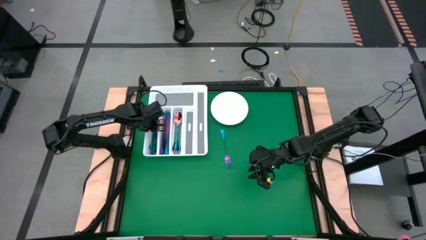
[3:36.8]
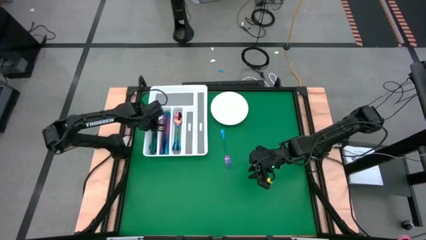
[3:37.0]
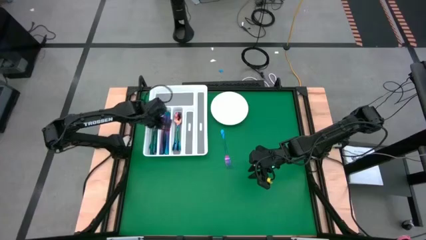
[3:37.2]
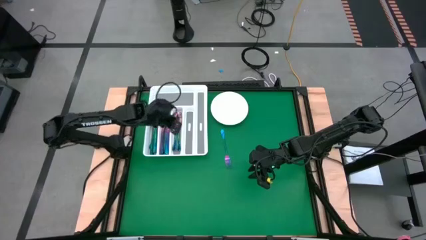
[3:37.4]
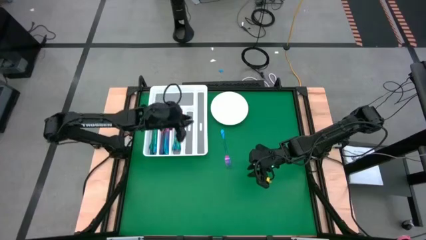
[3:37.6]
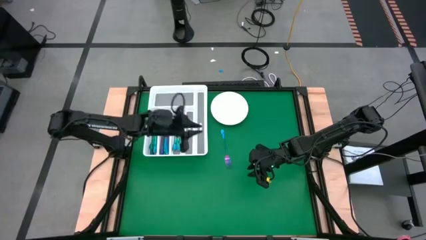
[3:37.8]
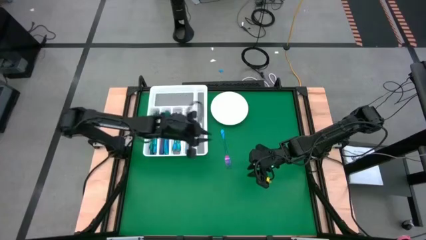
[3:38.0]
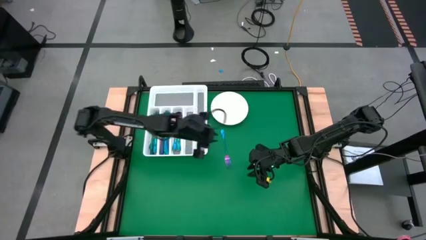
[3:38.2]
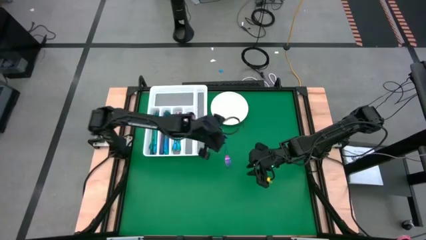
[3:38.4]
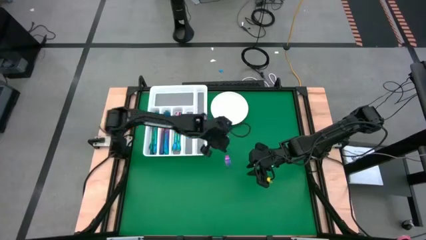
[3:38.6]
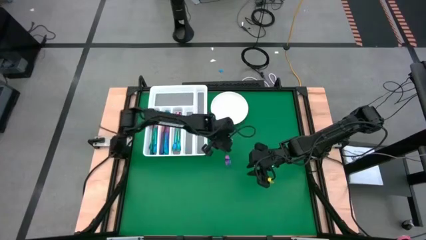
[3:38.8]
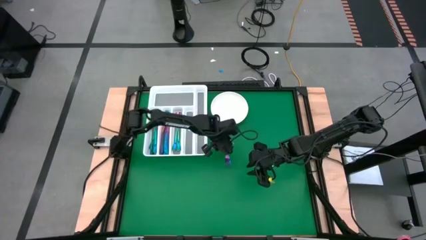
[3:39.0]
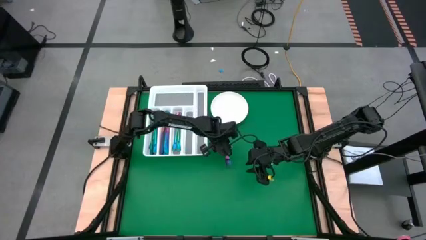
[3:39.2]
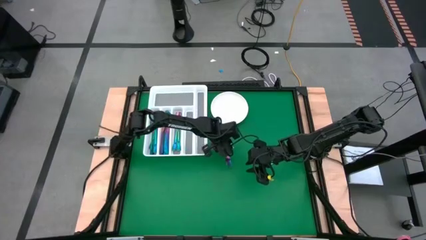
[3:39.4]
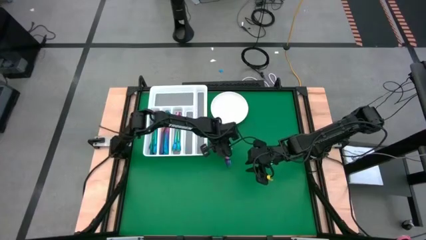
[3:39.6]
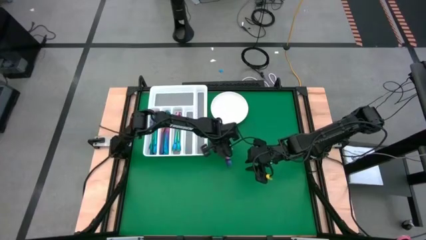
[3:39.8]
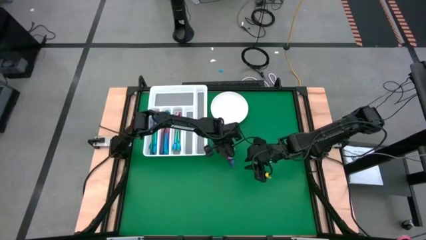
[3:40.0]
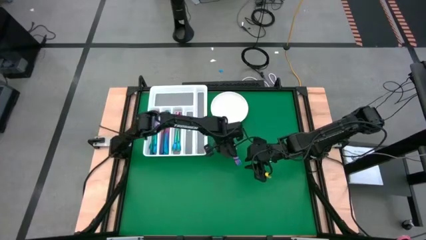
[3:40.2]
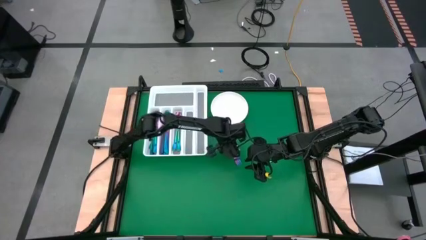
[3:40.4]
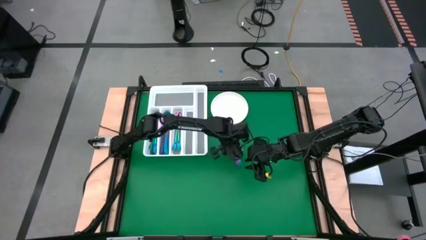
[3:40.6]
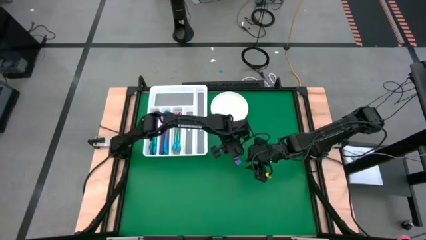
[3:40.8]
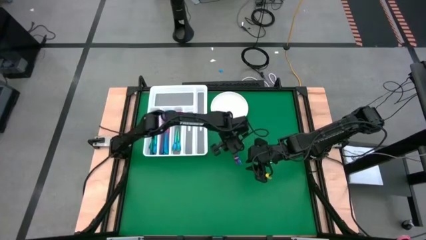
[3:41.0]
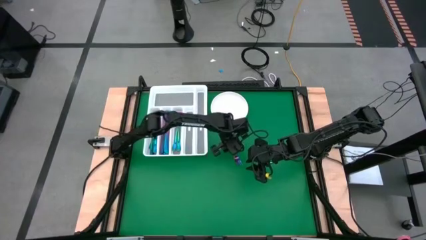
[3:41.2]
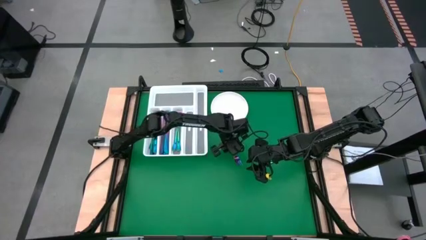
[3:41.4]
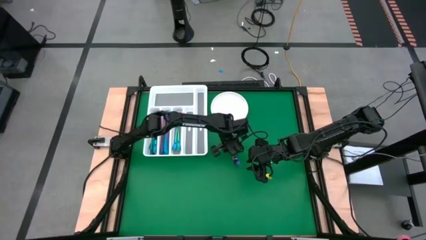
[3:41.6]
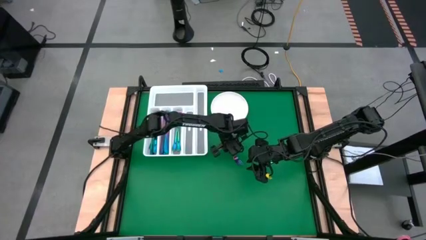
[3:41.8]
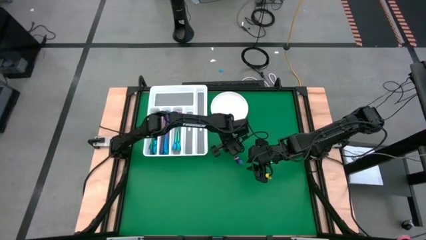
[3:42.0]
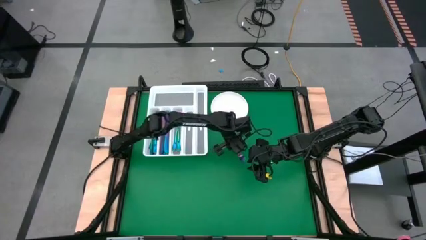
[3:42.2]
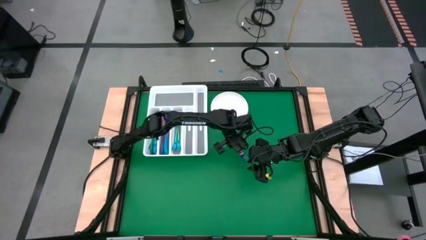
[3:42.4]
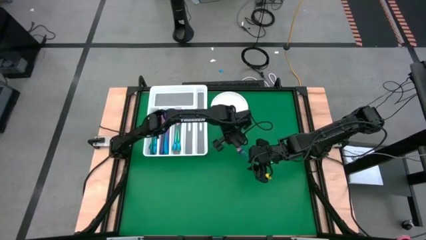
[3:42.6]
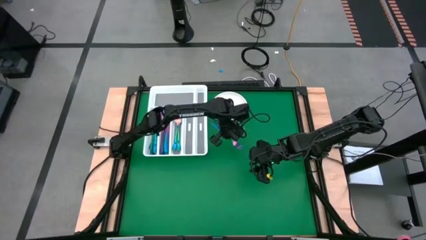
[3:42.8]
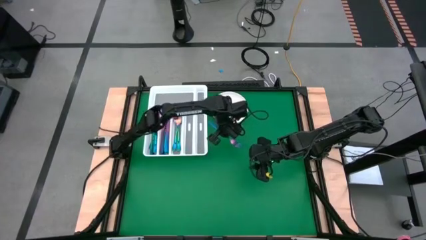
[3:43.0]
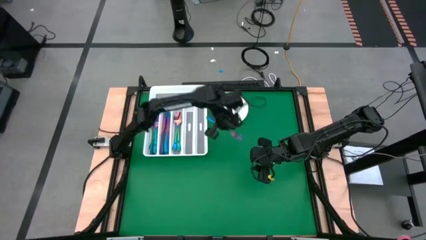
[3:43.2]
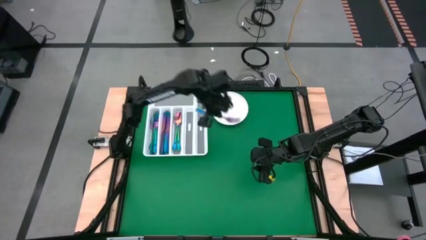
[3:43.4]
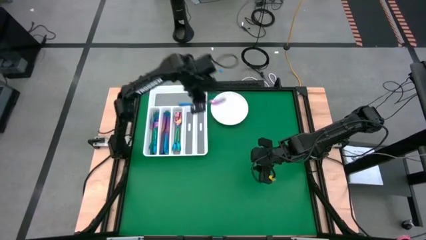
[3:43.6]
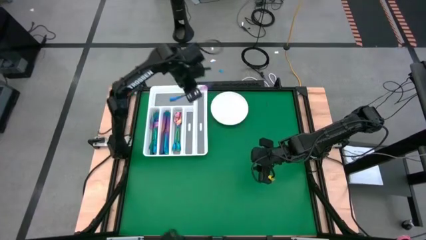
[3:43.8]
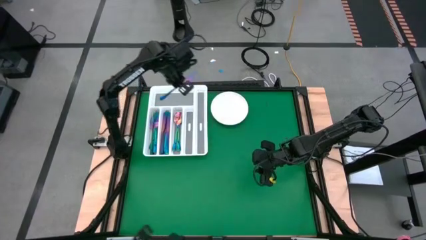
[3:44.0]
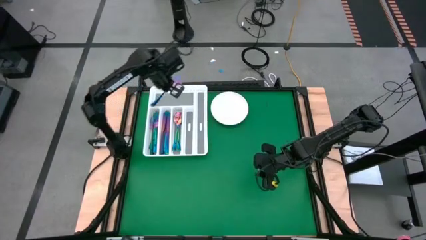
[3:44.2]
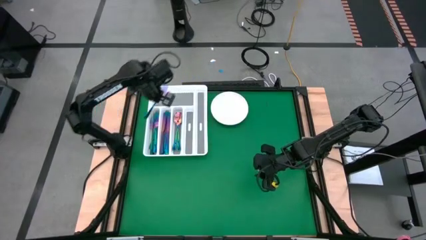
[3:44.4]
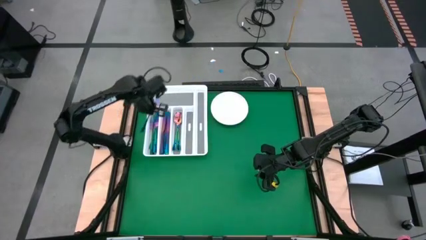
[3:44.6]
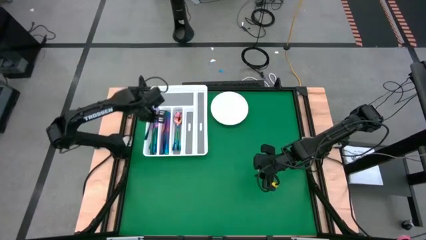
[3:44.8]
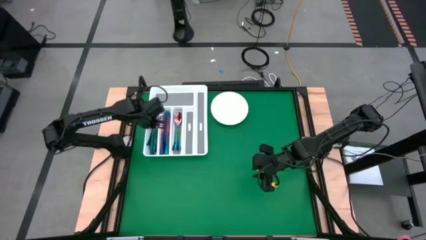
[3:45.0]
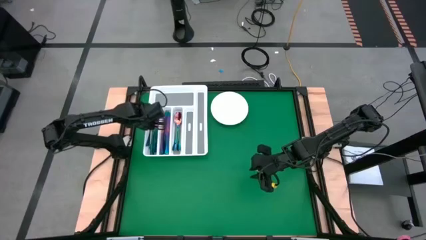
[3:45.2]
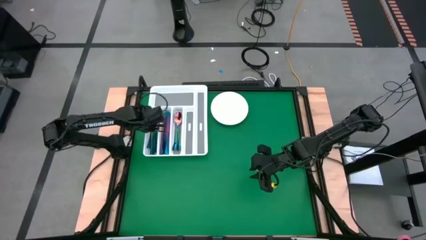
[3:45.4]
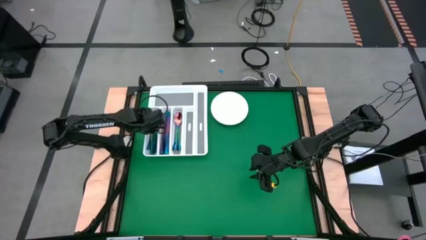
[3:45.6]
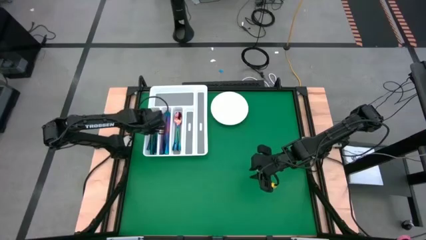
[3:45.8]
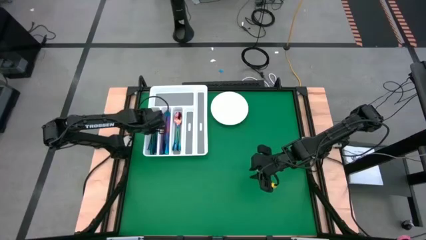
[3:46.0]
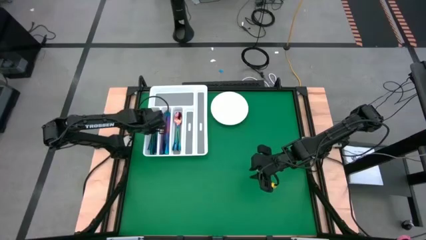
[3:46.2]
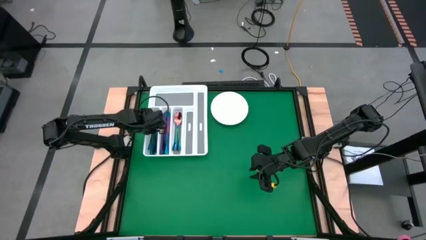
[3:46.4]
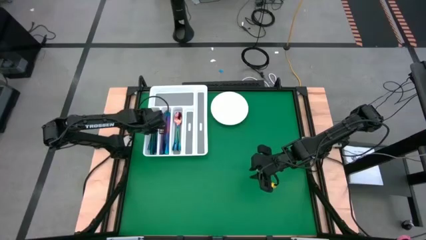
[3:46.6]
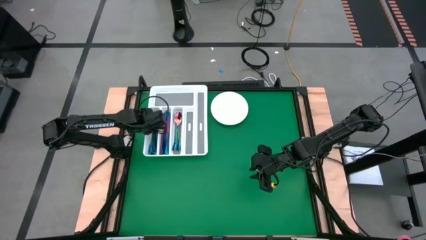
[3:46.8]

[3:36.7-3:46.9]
Task: Sort silverware
Put the blue fork into the silverware tray

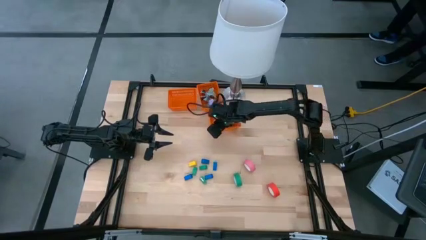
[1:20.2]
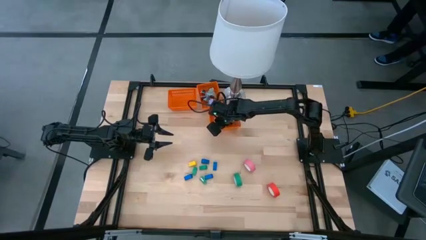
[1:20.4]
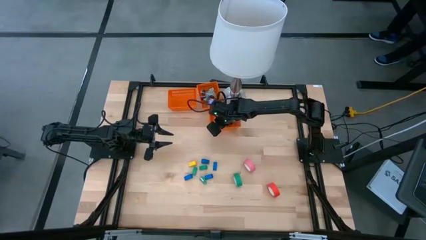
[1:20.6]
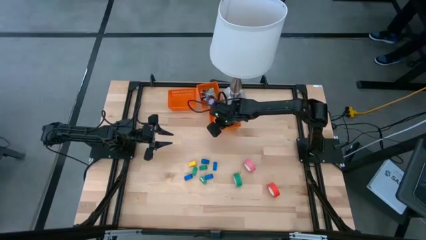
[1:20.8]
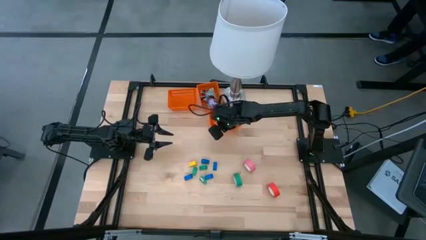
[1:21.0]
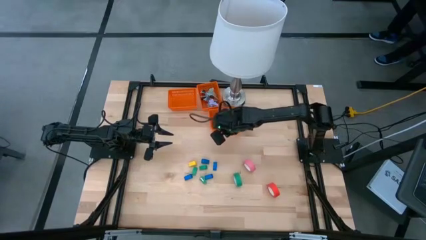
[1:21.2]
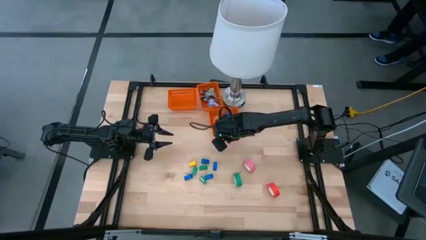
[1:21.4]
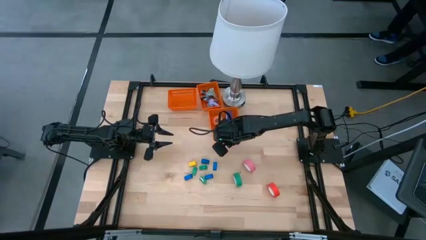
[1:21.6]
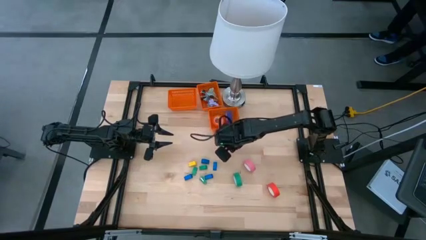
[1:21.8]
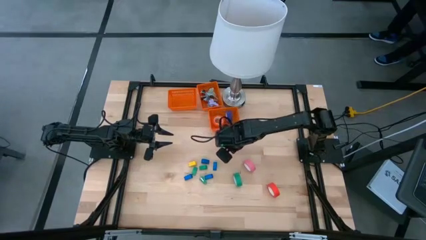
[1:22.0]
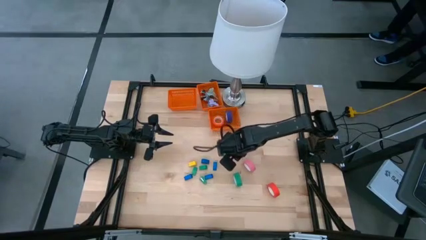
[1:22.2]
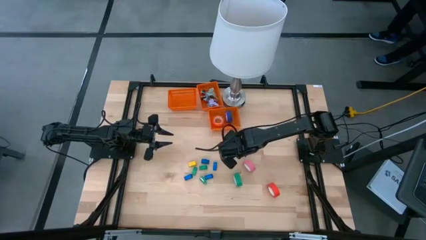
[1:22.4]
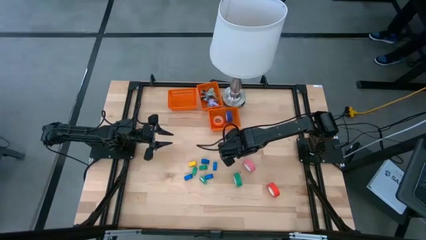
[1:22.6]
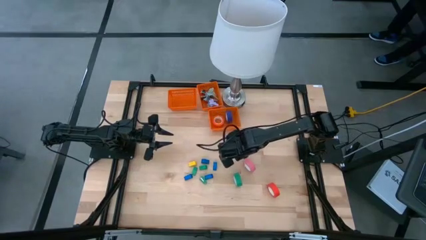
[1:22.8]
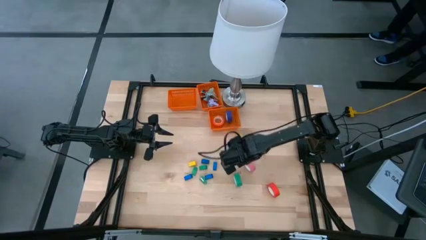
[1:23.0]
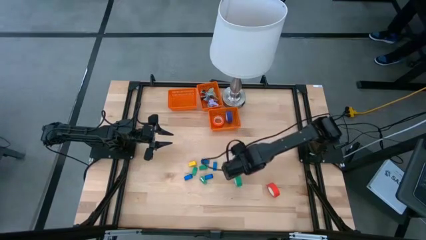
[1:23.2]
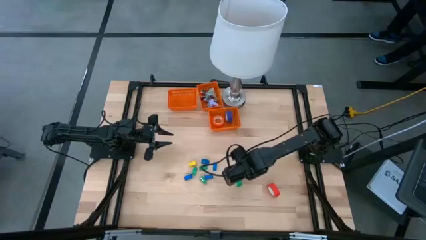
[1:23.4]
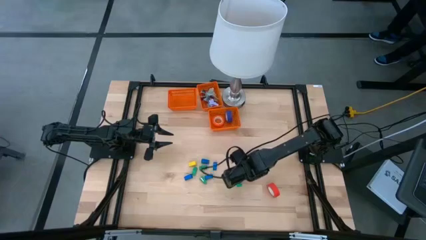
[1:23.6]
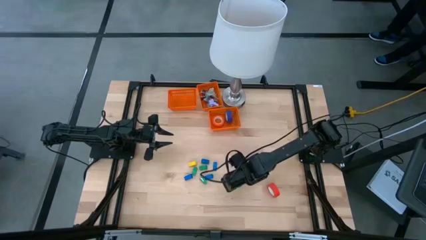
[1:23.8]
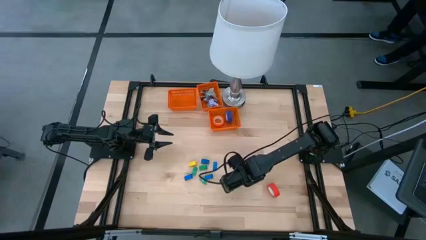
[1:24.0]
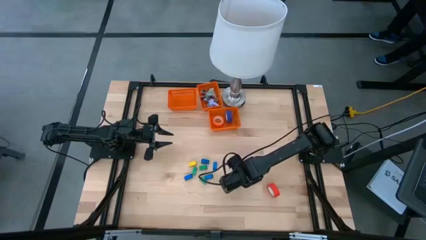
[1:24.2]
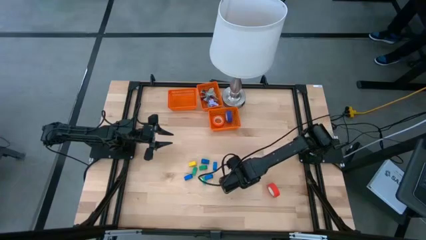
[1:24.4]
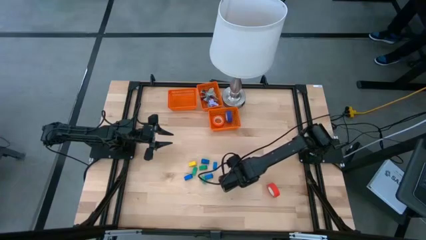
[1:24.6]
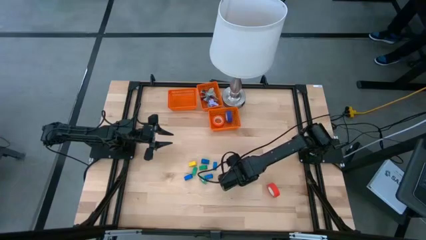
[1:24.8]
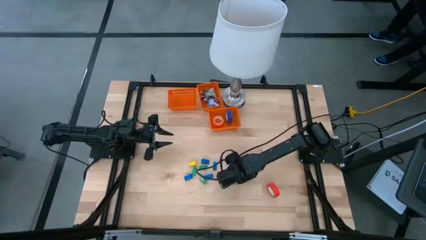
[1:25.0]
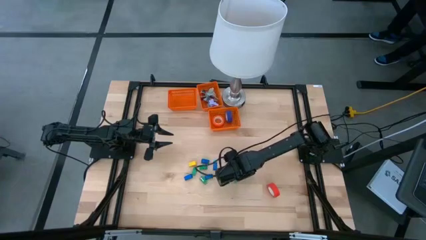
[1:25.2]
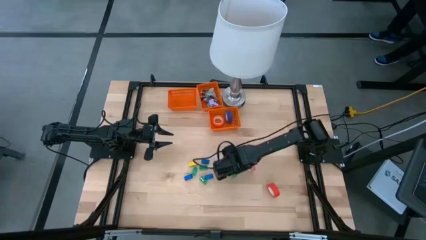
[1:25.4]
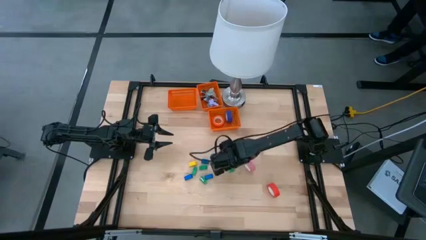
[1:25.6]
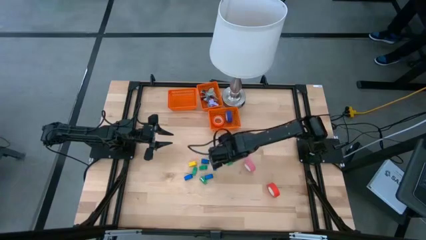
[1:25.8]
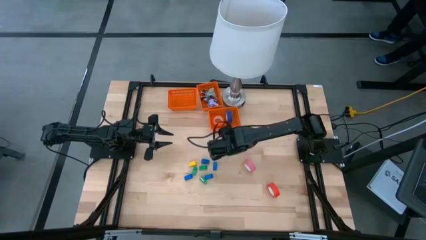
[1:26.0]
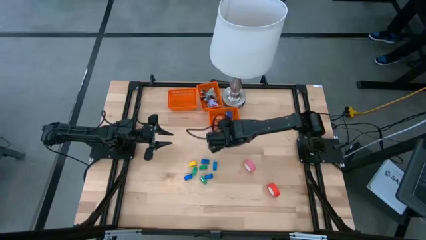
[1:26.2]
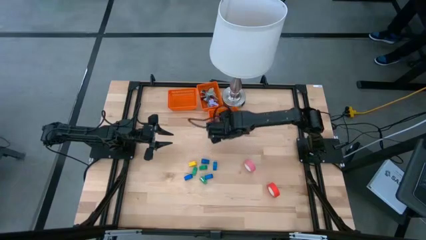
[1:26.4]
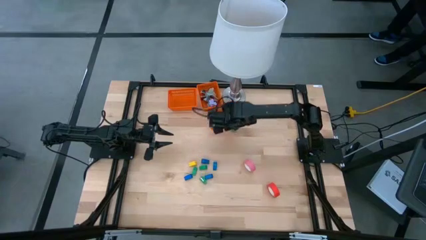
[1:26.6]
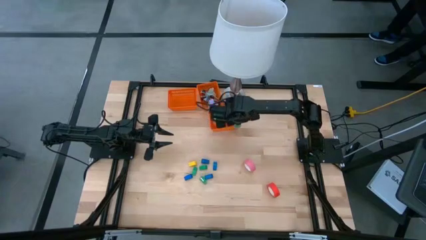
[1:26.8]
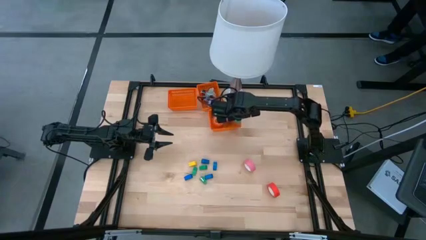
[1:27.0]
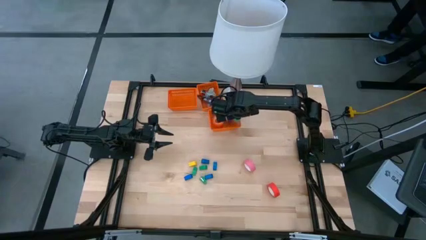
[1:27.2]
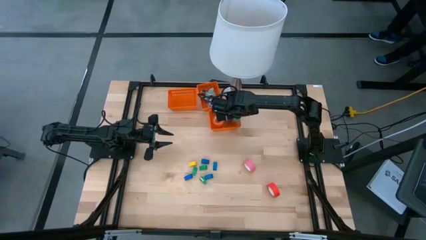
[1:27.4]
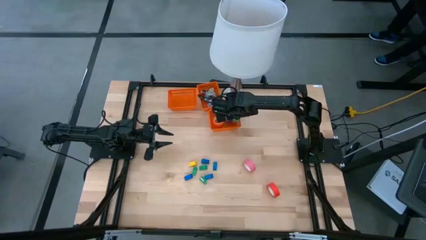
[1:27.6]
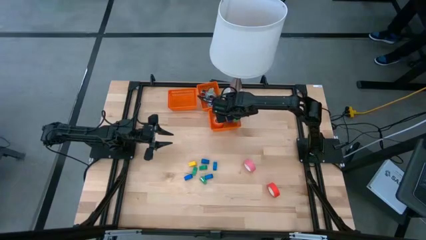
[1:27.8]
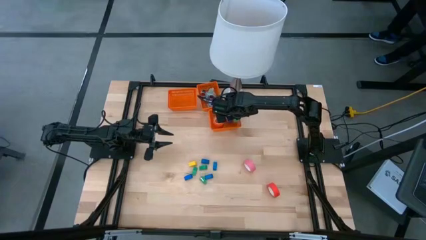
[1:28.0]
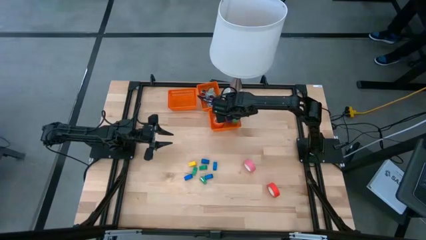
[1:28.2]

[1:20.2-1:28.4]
Task: Pick and place Stapler, Stapler remover, tape
Put the green tape into the bottom right orange basket
